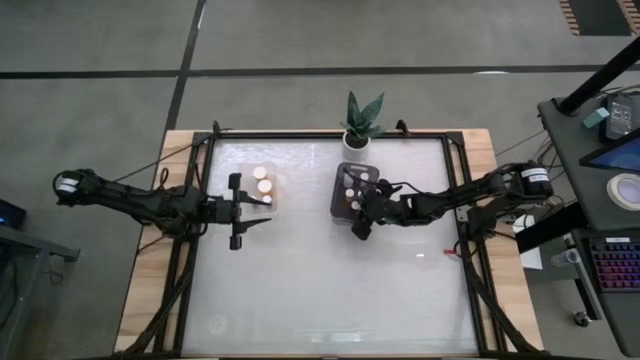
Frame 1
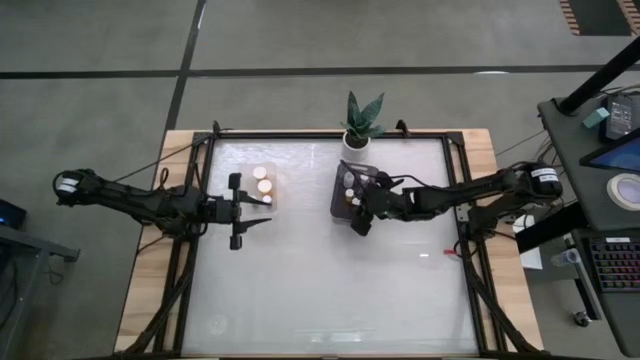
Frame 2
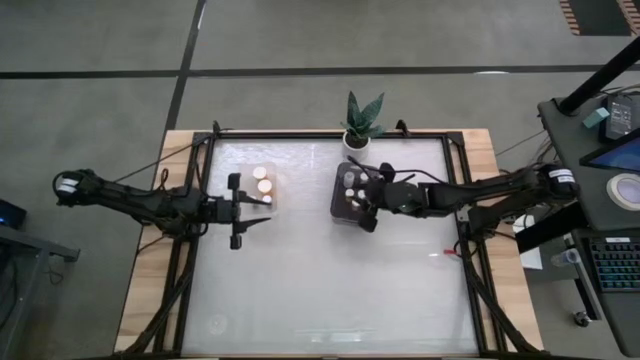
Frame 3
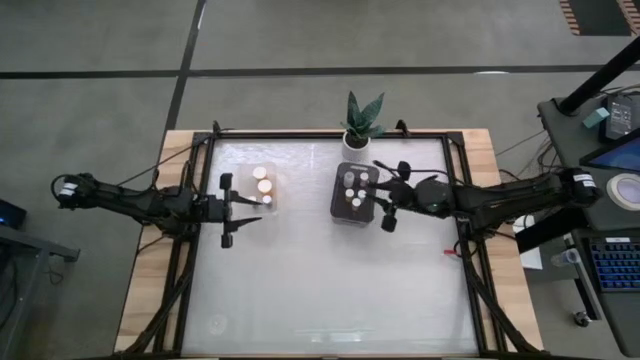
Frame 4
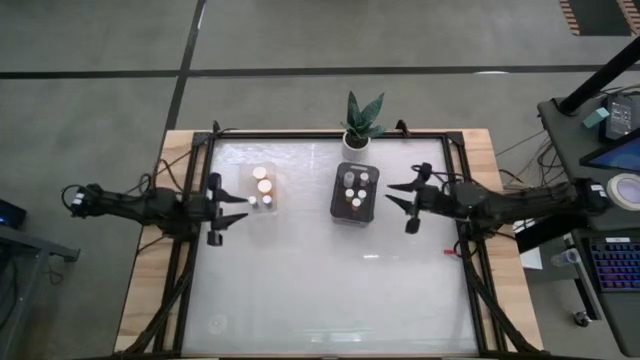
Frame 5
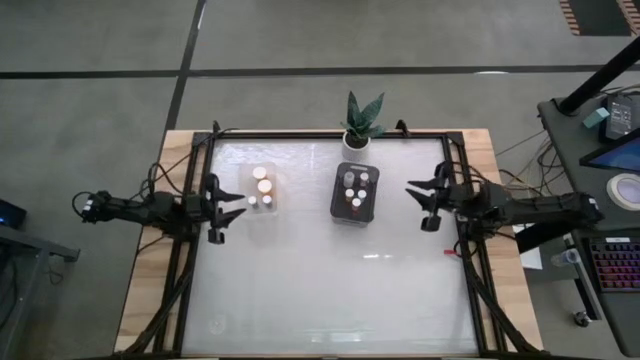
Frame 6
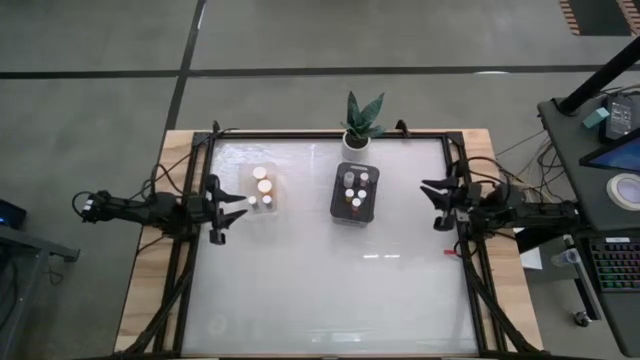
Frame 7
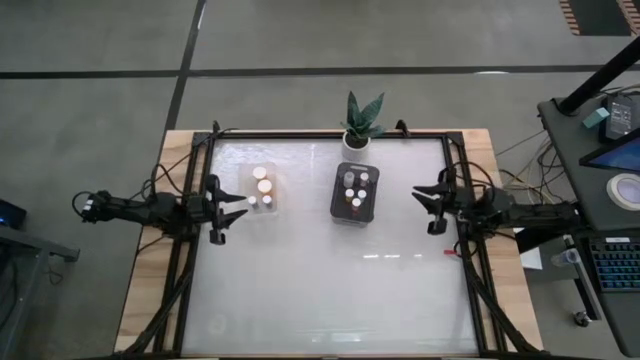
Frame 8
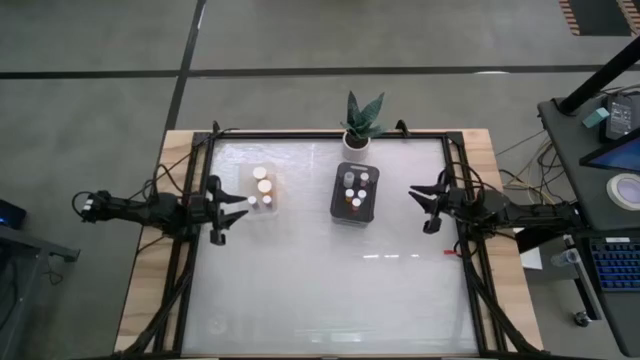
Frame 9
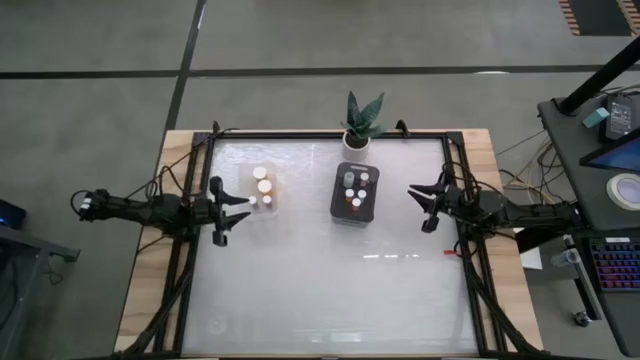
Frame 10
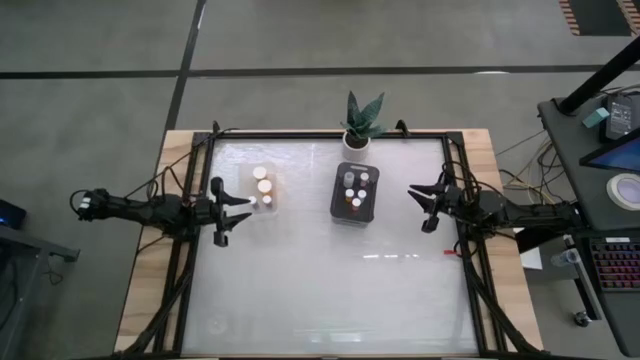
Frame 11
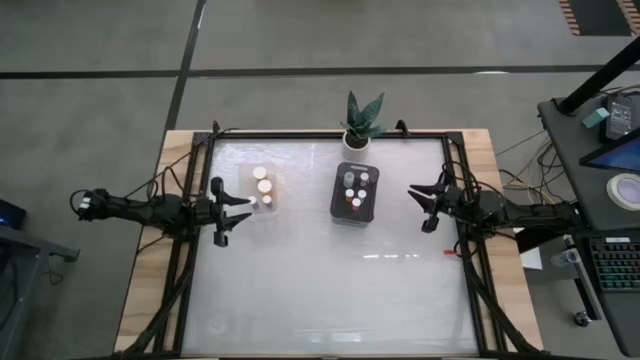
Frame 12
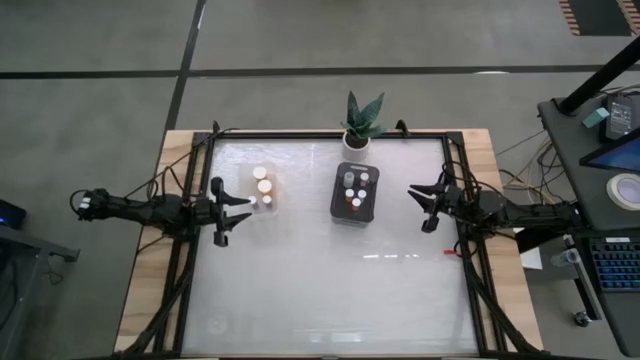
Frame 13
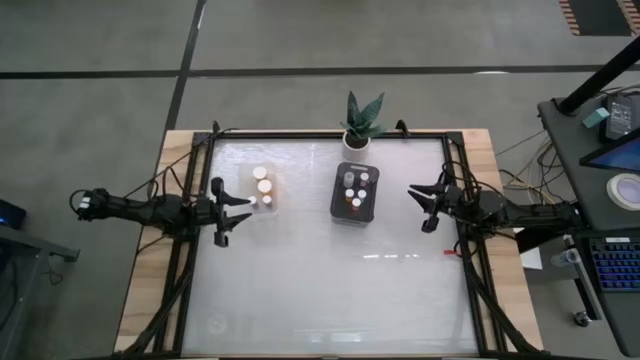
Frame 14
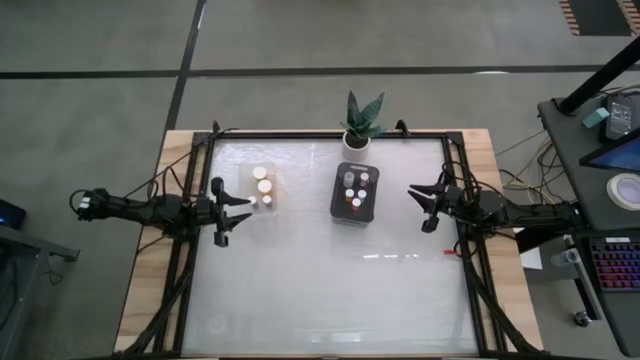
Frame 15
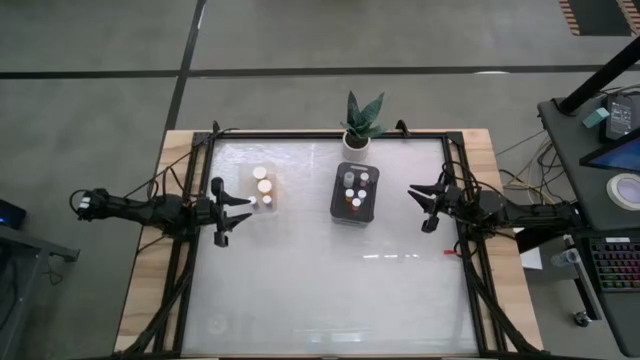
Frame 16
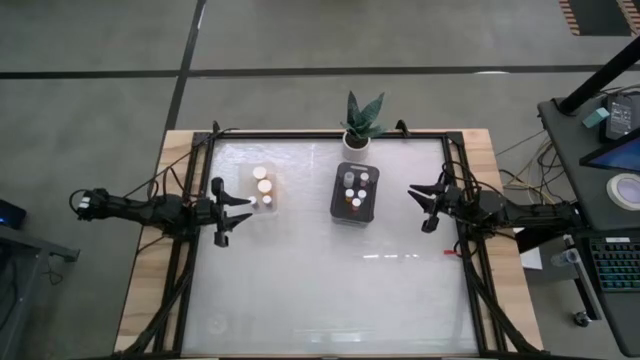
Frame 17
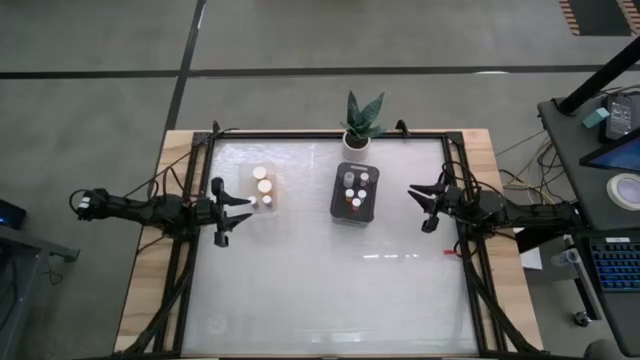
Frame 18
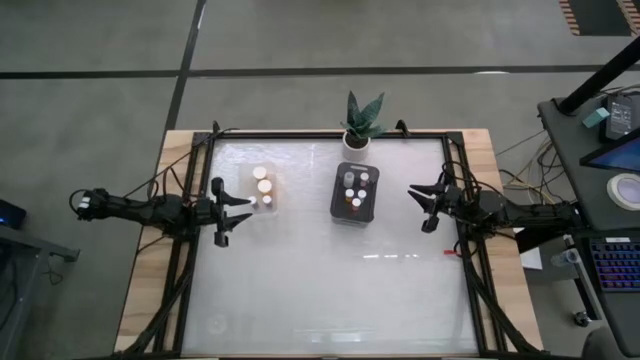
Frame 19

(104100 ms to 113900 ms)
Task: Pick and place medicine bottles into bin by pill shape (circle, oval)
Return to Home Position

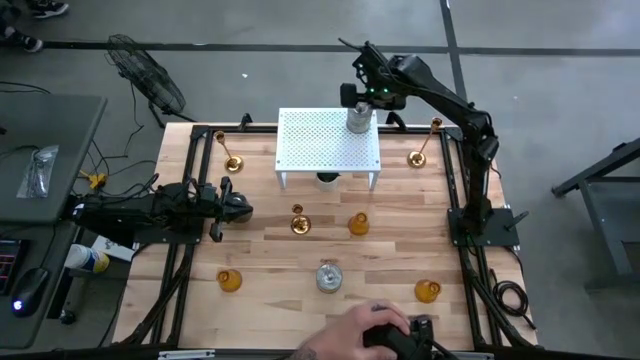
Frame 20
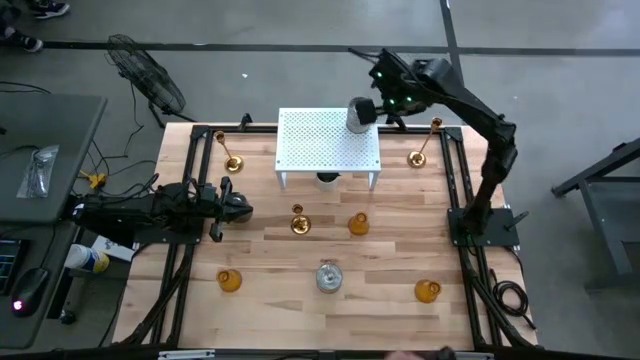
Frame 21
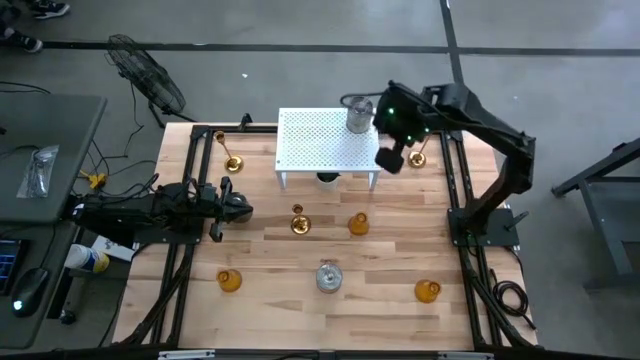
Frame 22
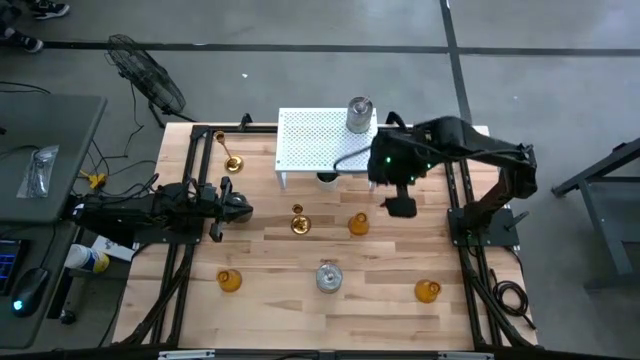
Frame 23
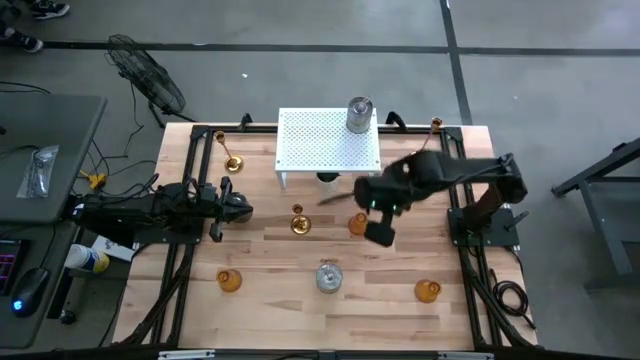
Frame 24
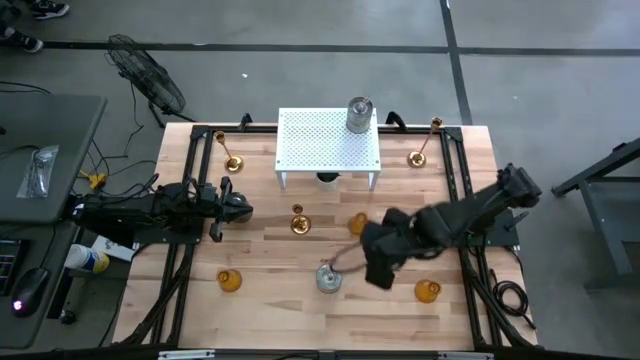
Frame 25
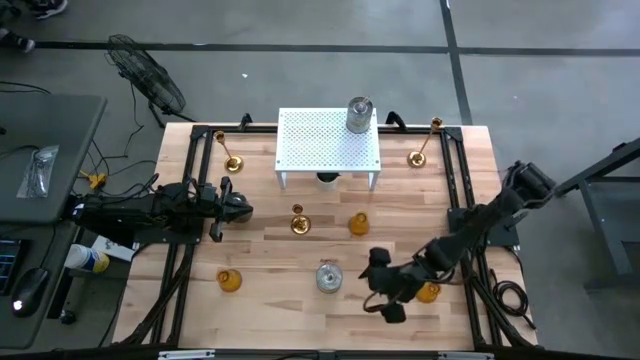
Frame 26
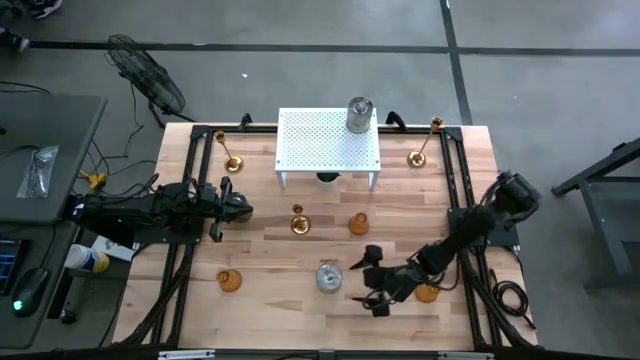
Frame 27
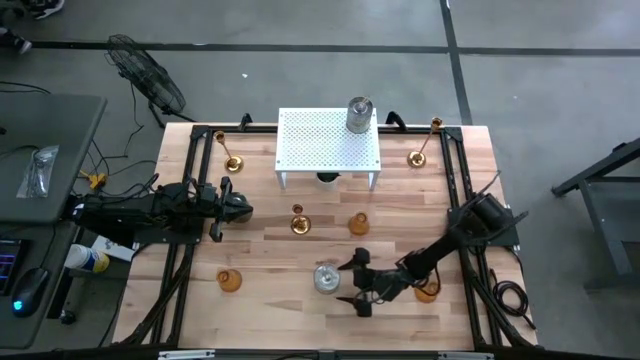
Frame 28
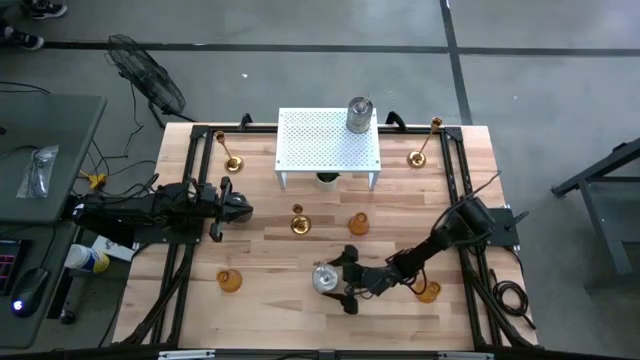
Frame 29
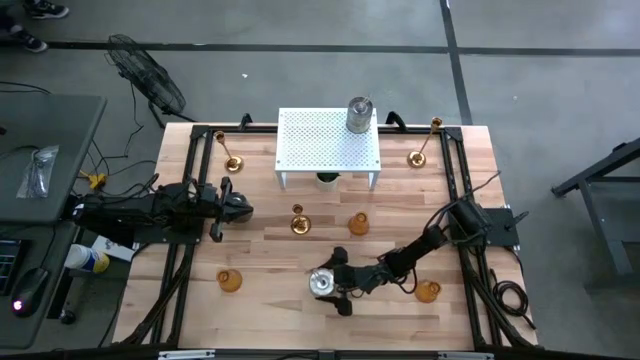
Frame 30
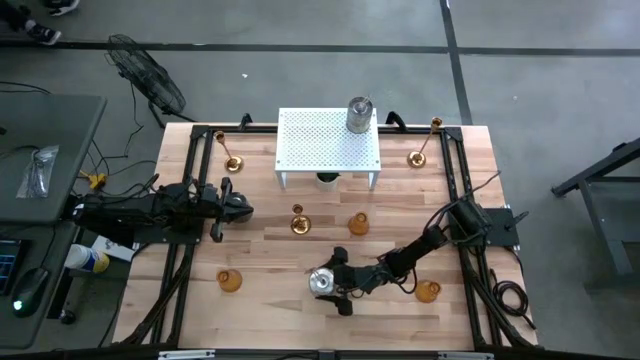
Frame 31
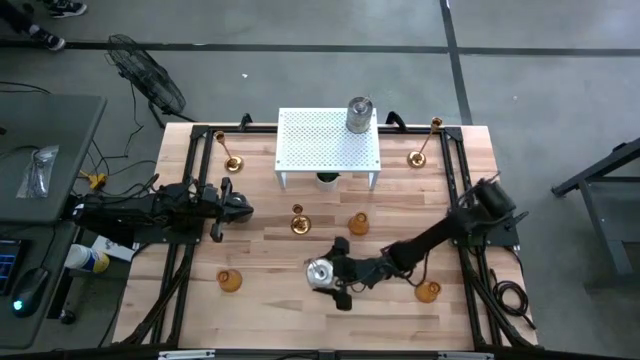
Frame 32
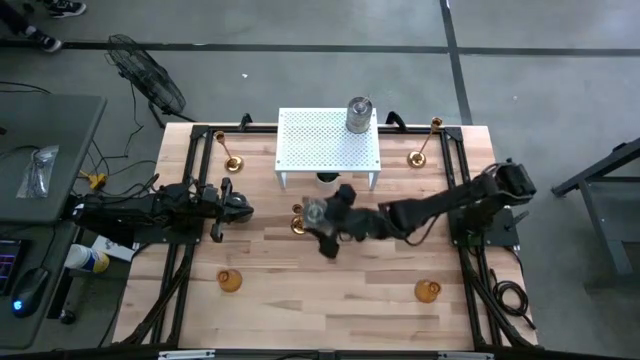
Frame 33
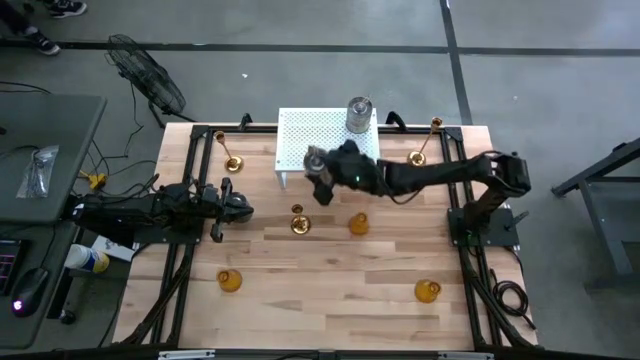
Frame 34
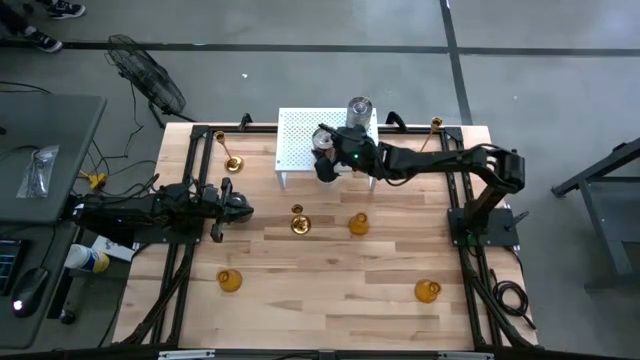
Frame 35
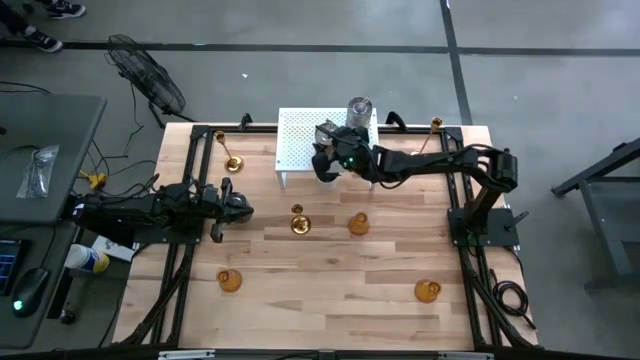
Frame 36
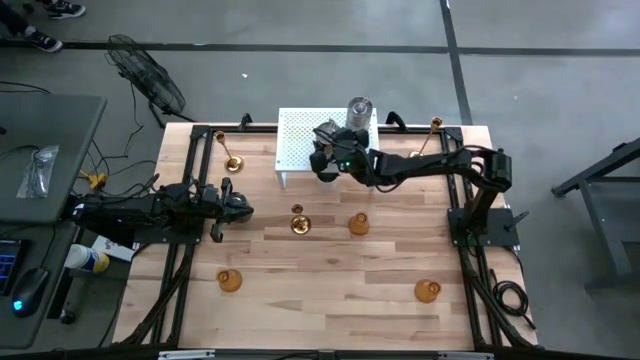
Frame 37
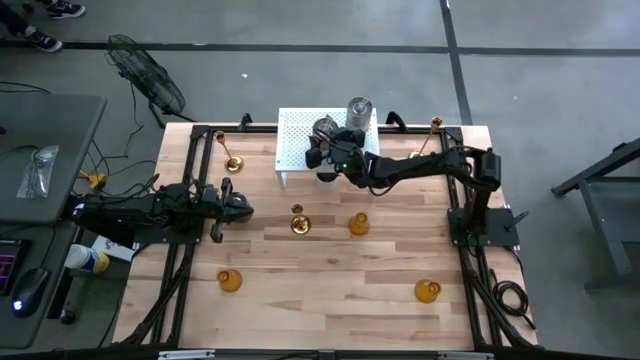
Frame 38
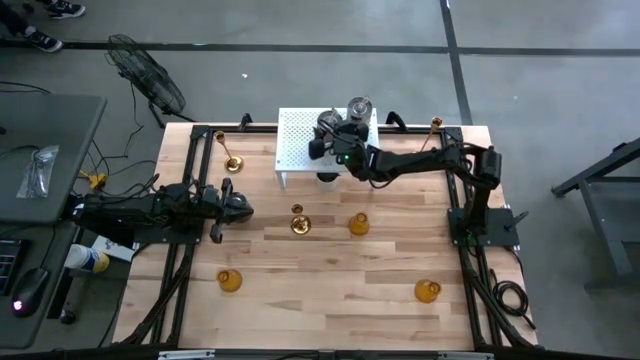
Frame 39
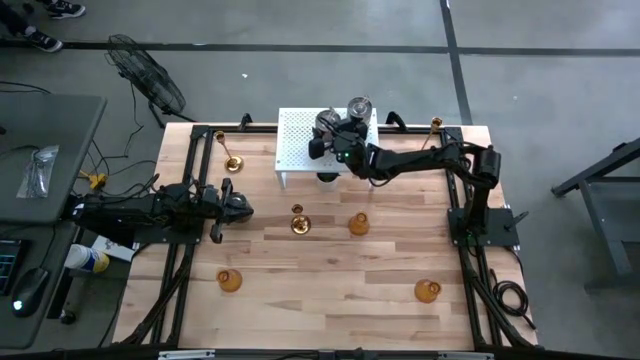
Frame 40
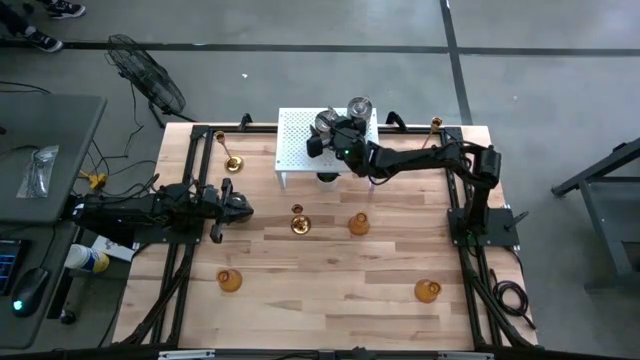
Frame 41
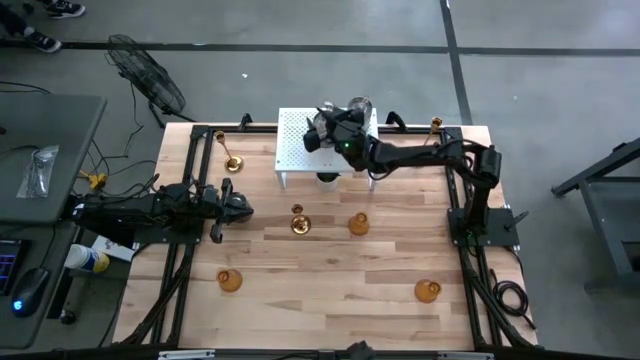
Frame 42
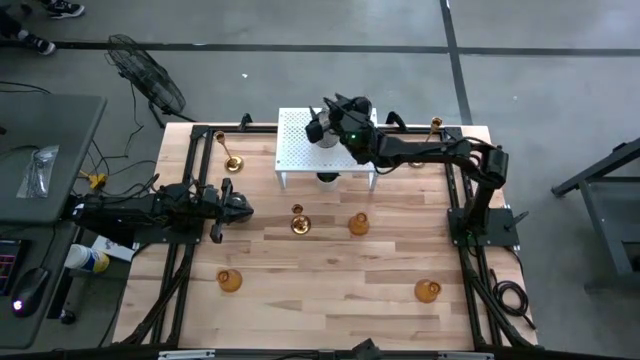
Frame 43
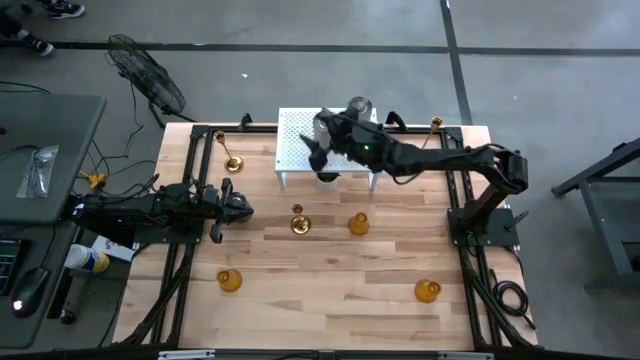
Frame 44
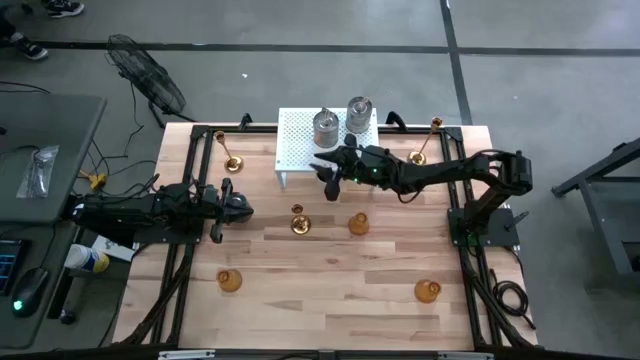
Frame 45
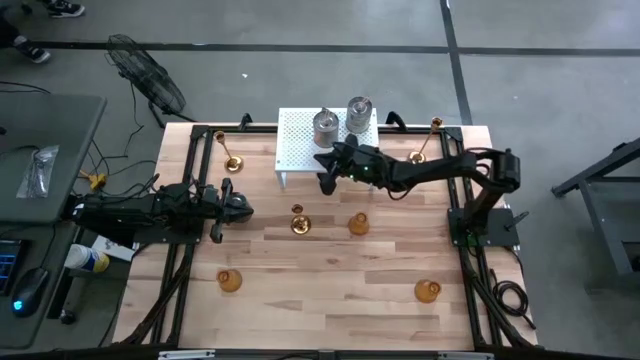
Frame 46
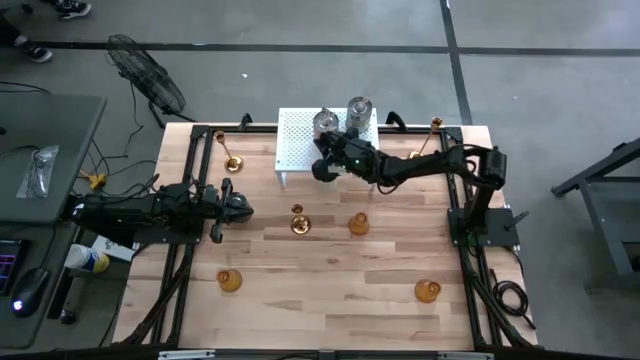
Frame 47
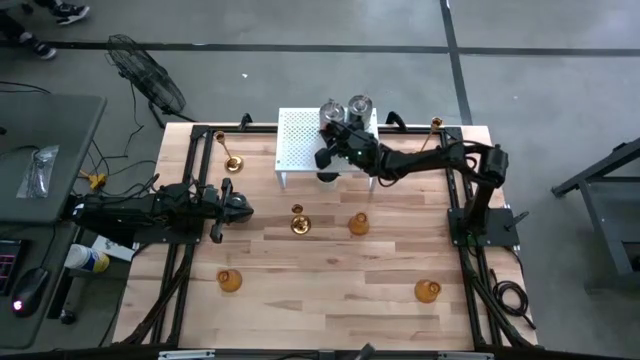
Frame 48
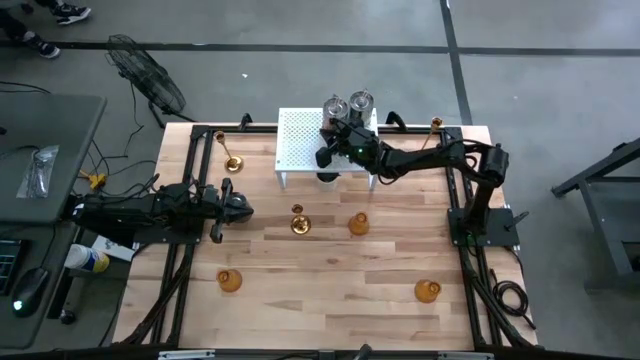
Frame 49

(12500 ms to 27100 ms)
Task: Pick & Place candle stick holders
Put the middle orange scented candle on the shelf
